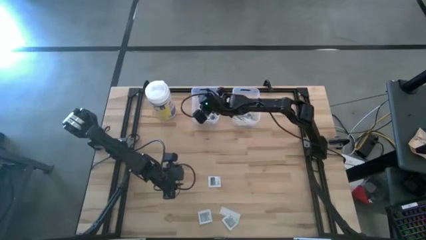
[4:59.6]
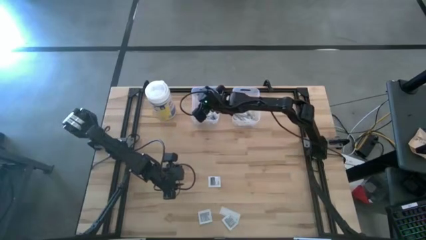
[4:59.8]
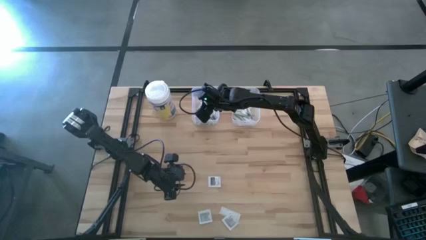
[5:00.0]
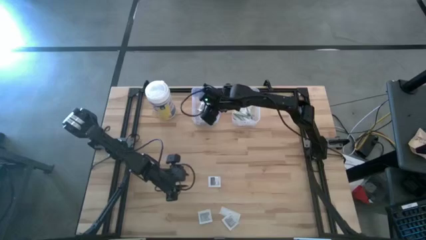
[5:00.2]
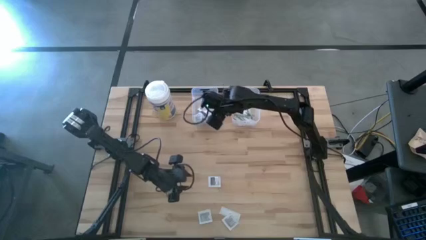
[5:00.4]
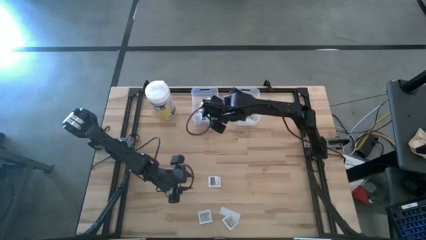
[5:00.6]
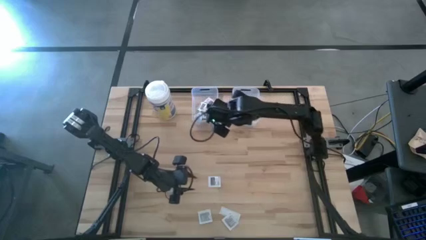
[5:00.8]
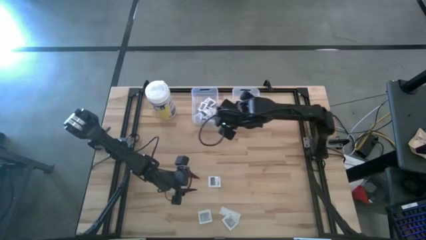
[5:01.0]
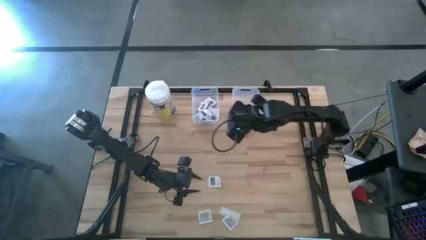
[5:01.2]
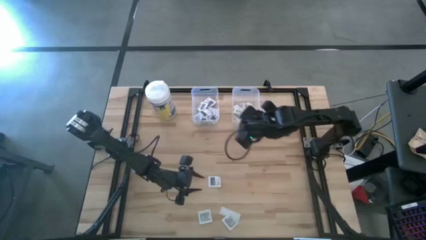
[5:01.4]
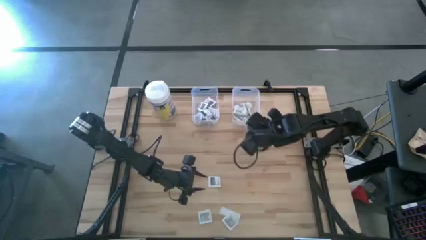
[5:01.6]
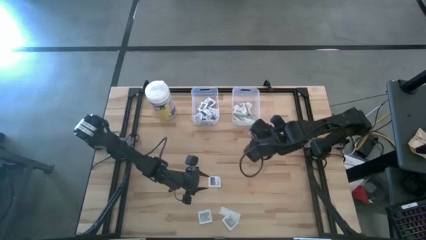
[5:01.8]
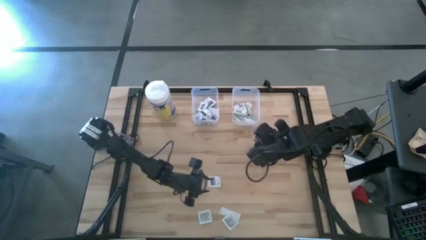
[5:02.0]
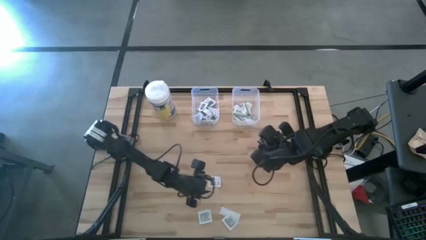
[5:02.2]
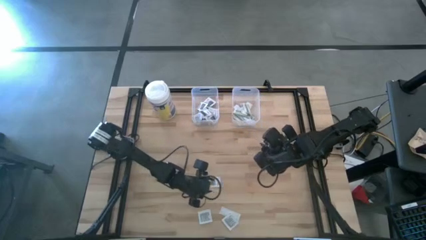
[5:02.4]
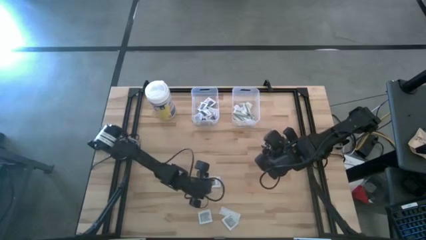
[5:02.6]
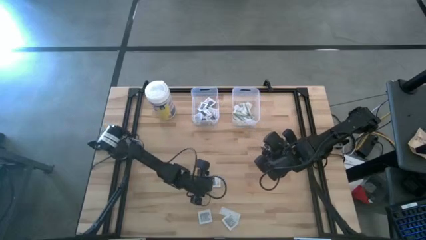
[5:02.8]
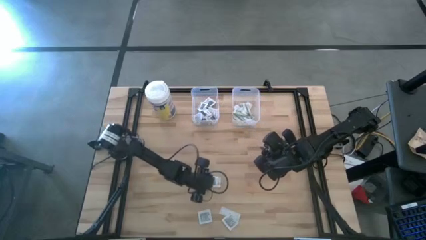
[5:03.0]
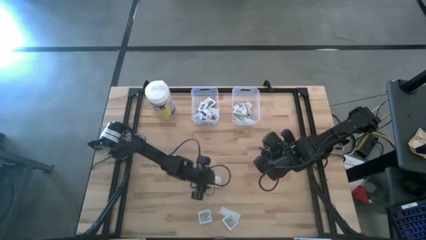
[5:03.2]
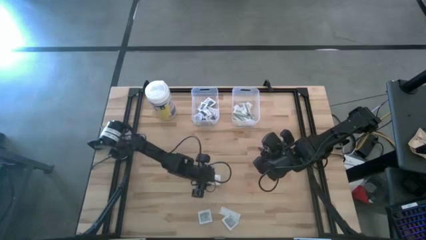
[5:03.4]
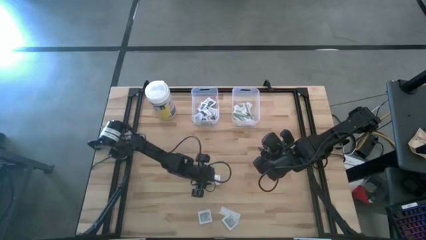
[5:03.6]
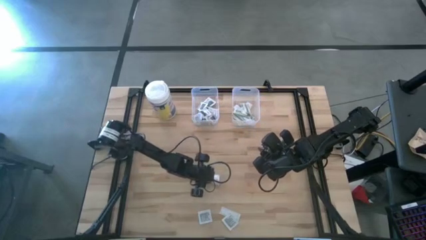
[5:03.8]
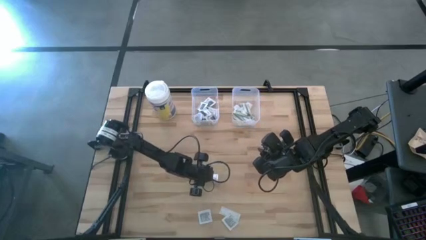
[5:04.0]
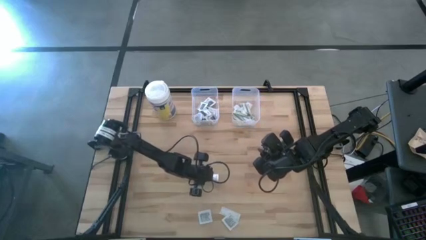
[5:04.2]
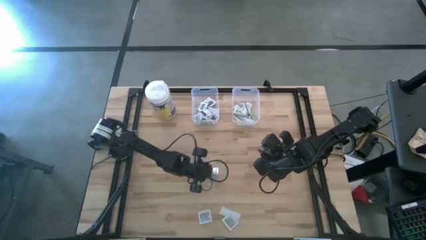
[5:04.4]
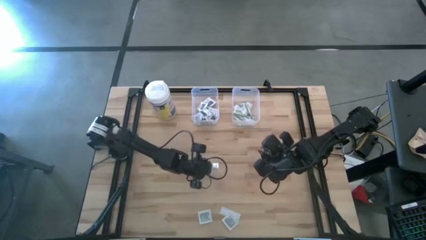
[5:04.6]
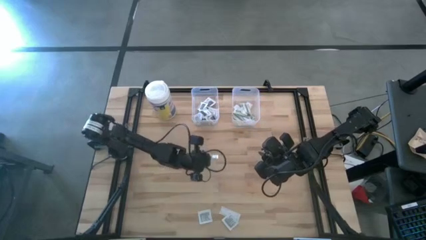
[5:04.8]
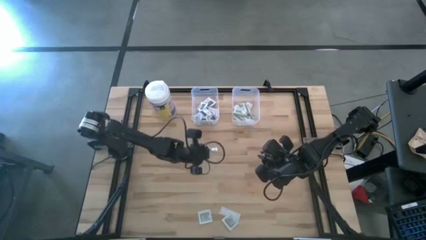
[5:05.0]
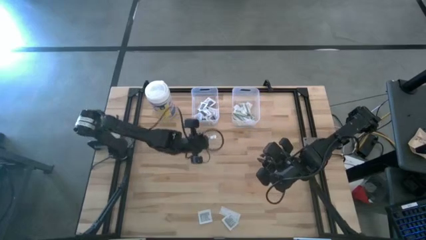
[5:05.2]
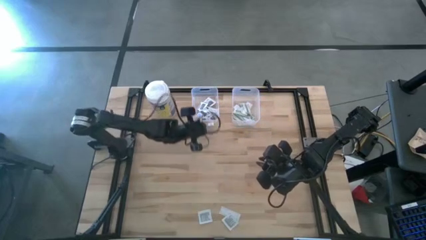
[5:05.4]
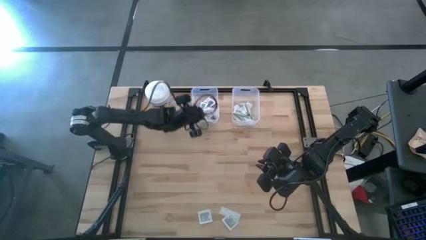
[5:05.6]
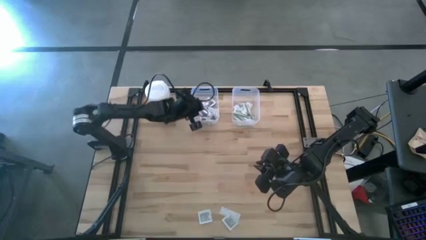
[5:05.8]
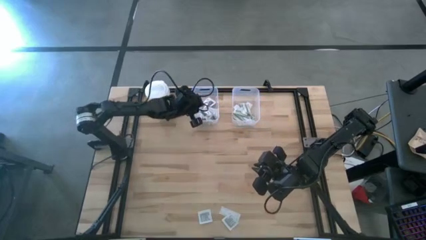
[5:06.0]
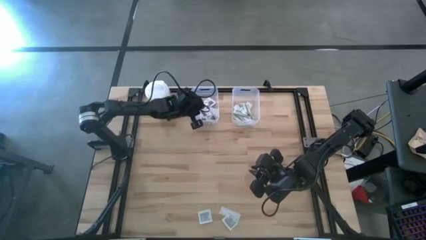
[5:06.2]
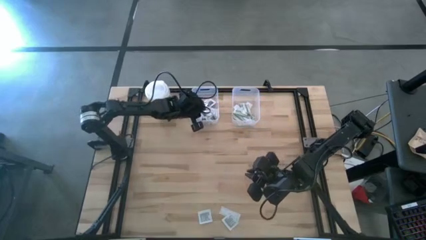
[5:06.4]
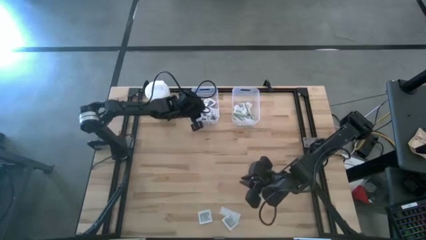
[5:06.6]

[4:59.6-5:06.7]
Task: Pick & Place First Aid Supplies
Put the towelette pack into the left transparent bin

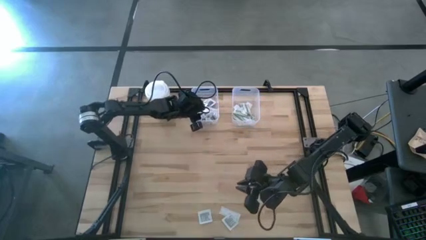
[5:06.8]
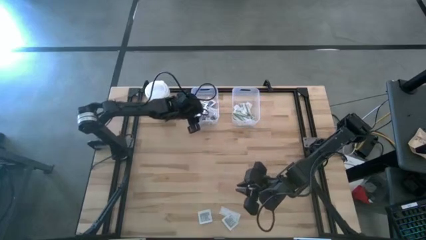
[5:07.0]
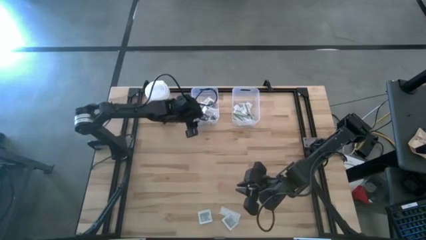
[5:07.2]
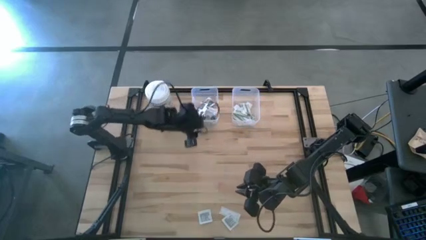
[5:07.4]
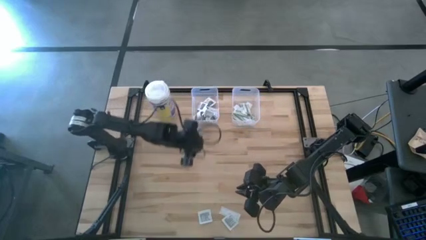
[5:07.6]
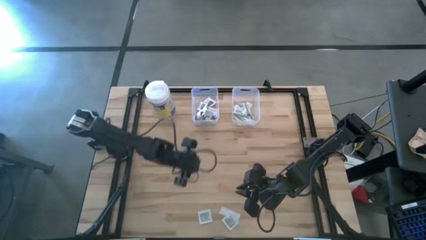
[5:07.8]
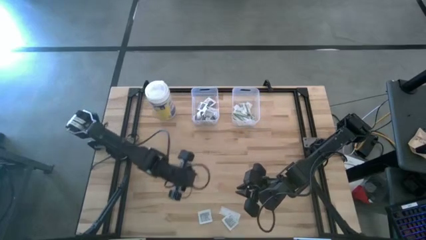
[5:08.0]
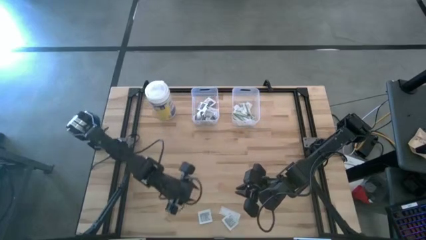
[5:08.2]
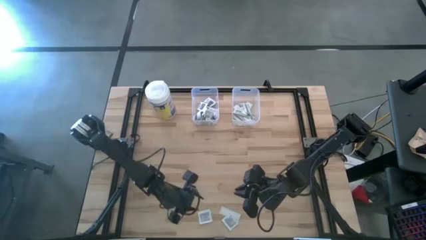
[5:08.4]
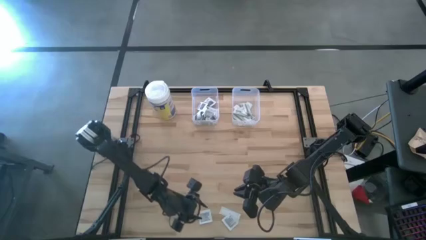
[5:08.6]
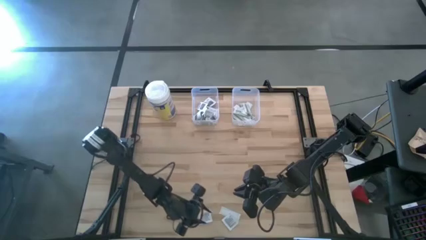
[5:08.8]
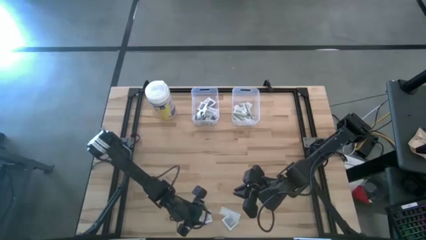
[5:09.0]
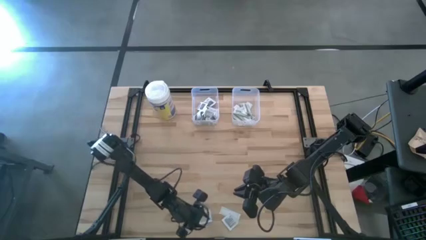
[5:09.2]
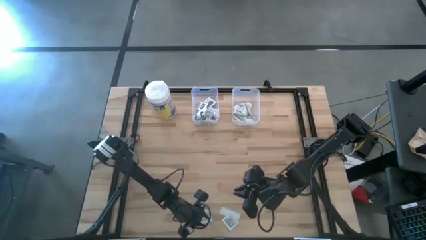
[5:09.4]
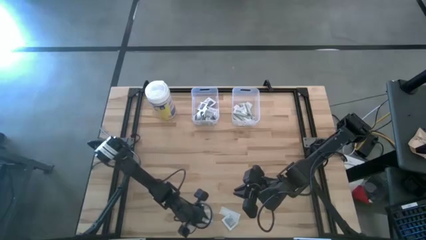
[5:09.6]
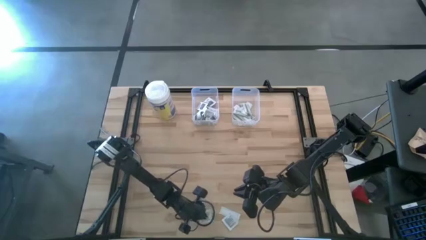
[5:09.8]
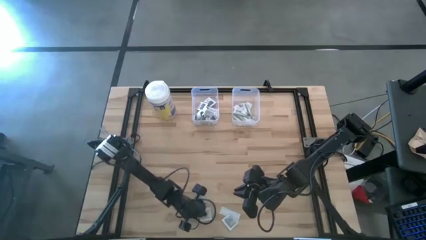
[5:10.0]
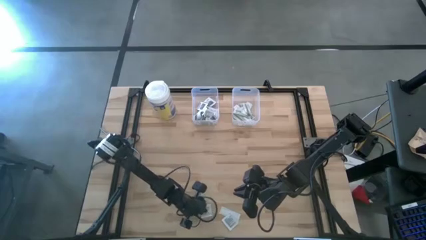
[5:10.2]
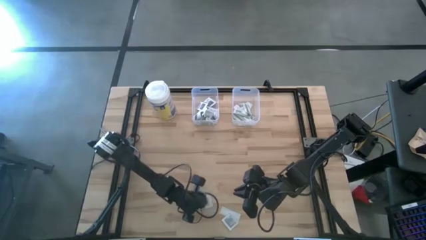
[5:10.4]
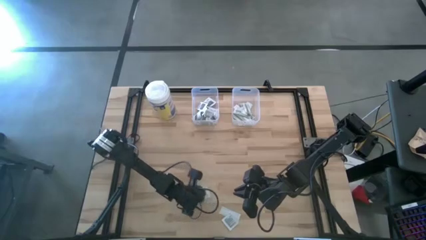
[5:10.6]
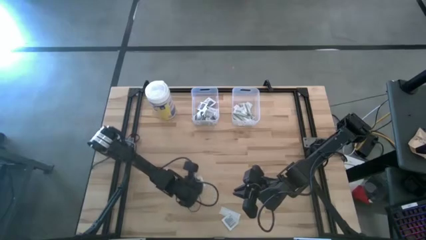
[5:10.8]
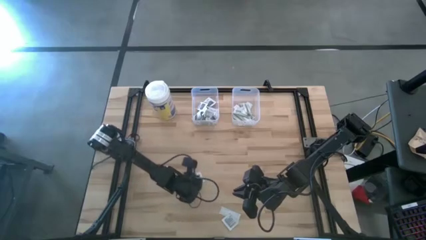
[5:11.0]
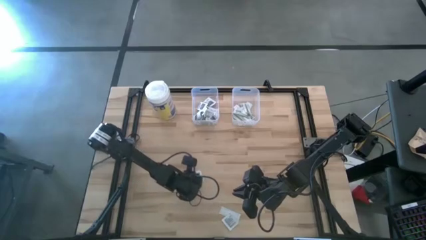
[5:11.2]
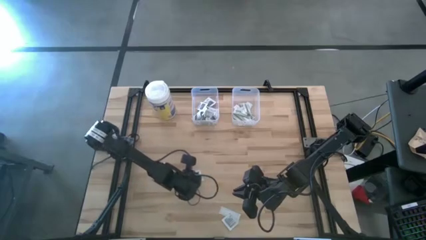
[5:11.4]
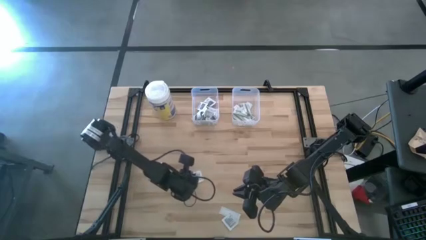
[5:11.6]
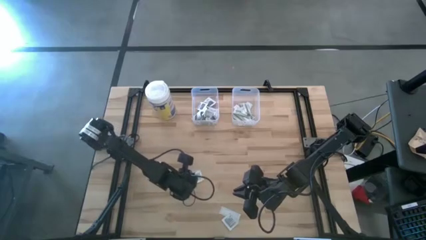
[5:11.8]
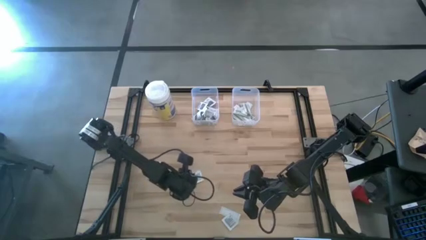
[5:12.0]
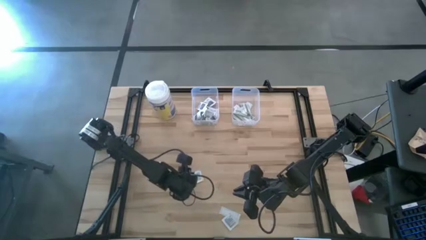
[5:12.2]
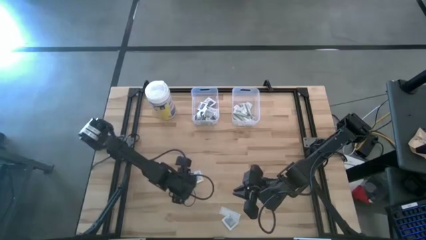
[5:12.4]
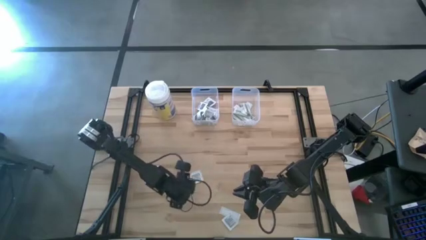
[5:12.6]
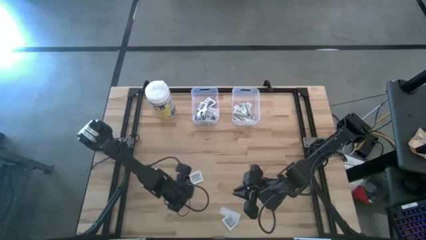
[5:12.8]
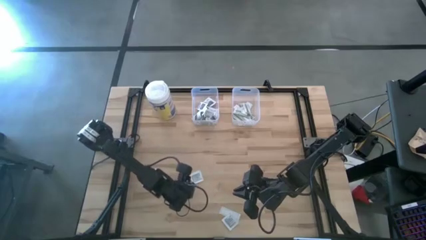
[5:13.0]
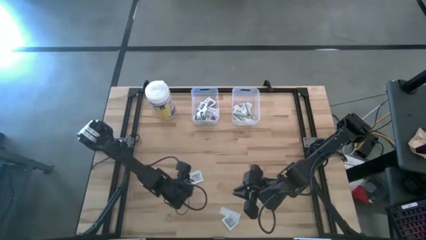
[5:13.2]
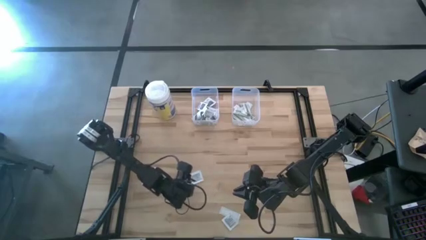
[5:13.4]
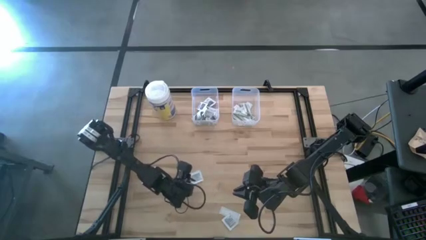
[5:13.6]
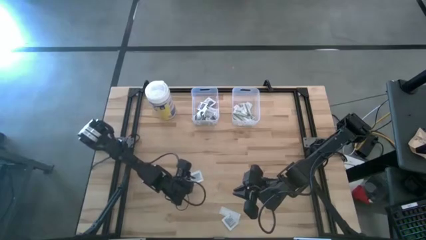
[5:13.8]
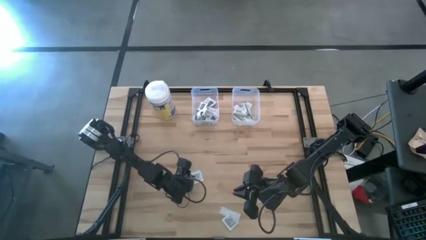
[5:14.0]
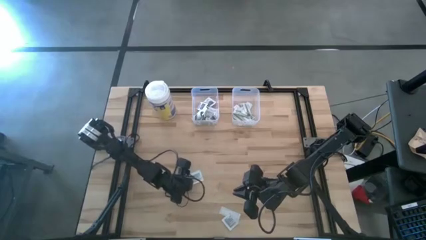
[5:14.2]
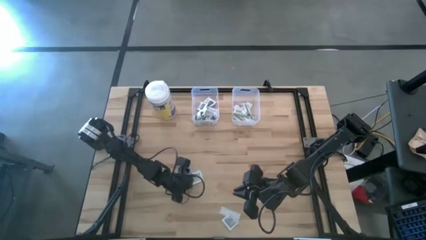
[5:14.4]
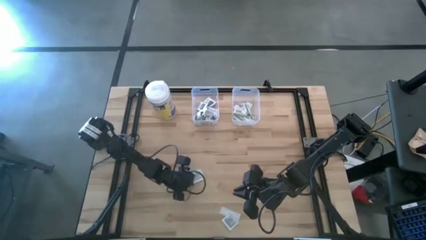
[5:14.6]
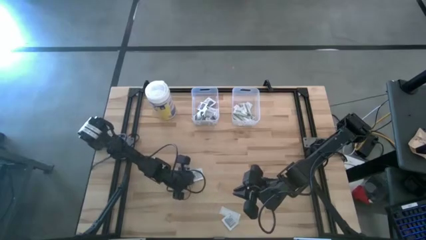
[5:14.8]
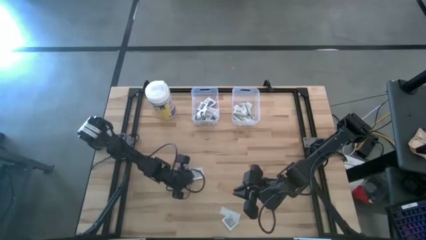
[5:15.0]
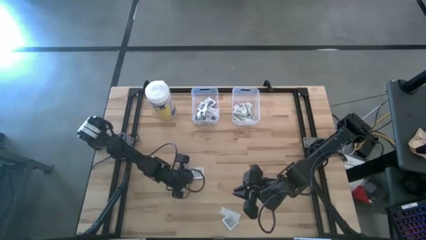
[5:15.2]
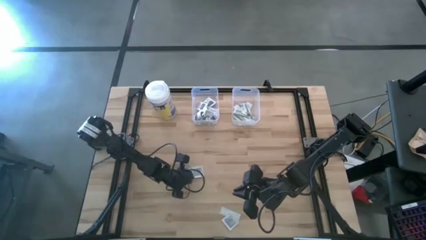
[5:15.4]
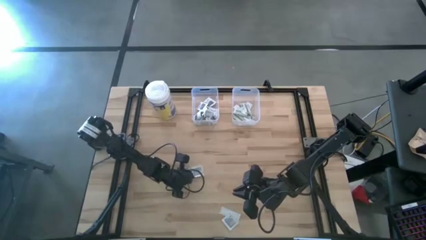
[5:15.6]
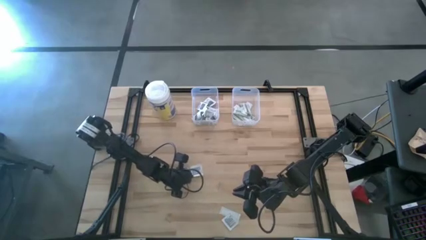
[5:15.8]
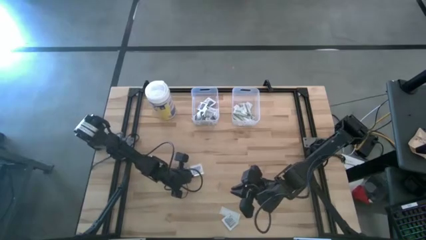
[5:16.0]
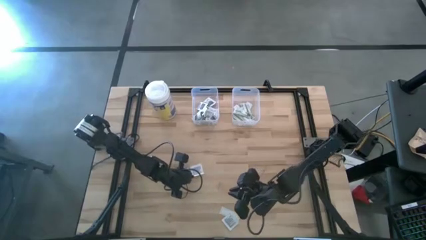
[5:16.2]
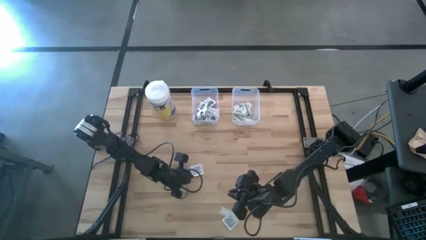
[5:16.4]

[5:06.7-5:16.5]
Put the towelette pack into the left transparent bin
